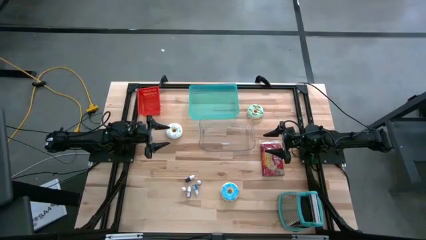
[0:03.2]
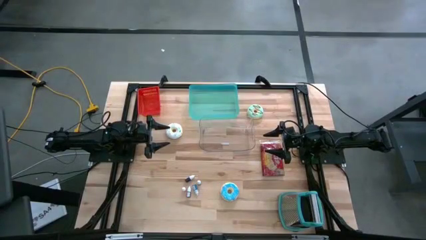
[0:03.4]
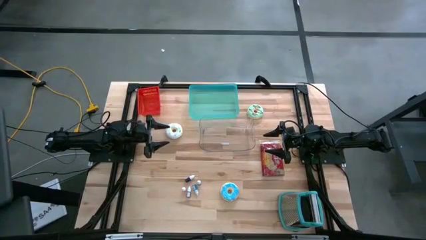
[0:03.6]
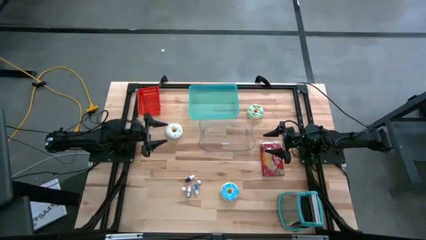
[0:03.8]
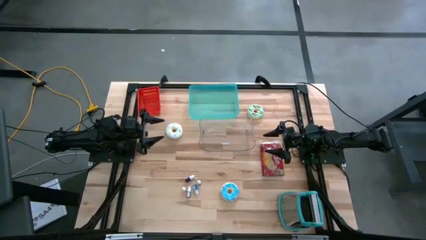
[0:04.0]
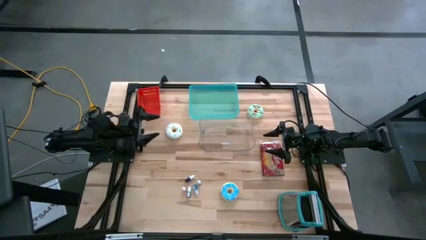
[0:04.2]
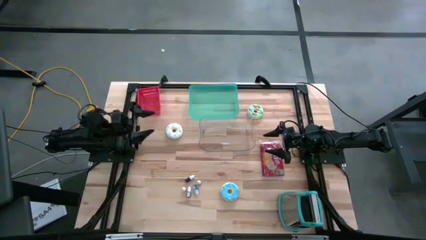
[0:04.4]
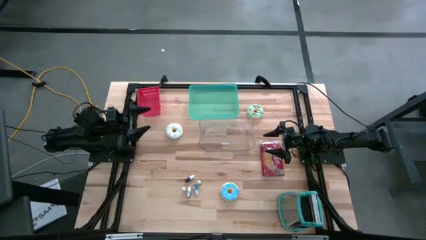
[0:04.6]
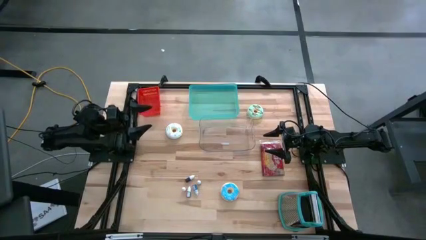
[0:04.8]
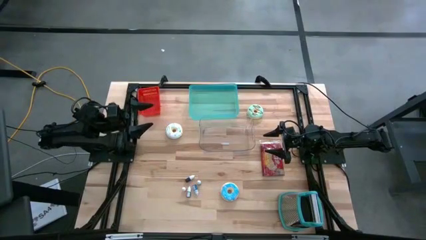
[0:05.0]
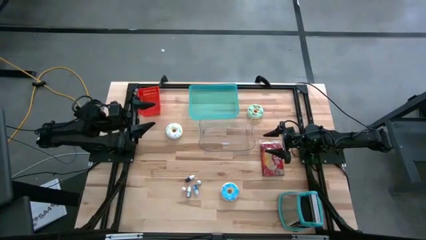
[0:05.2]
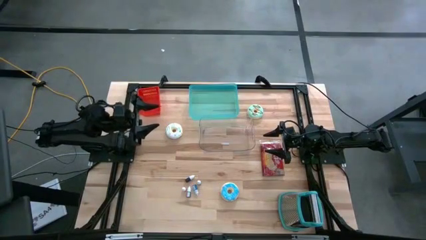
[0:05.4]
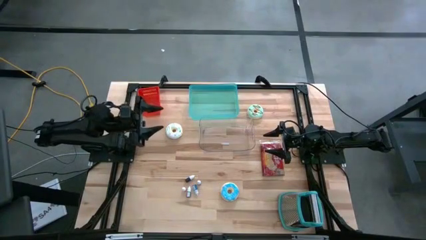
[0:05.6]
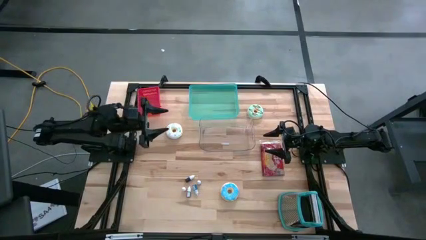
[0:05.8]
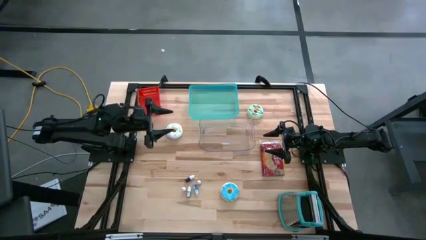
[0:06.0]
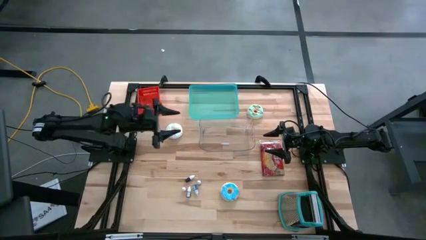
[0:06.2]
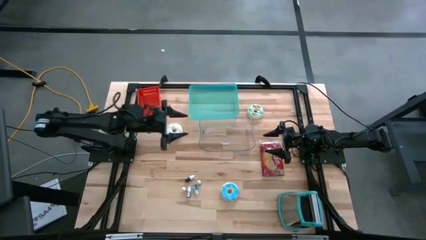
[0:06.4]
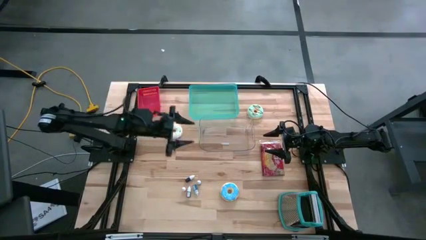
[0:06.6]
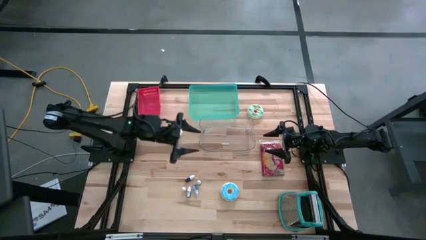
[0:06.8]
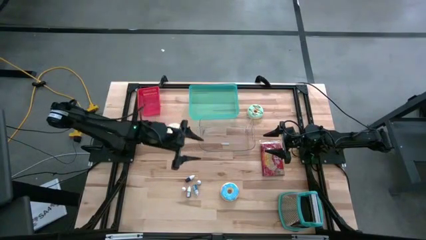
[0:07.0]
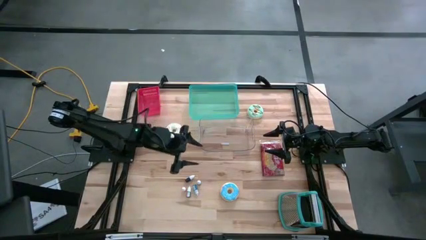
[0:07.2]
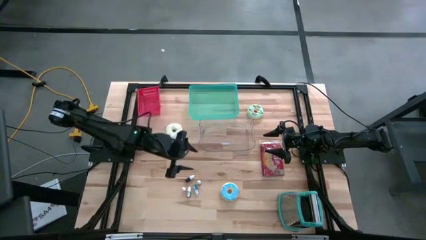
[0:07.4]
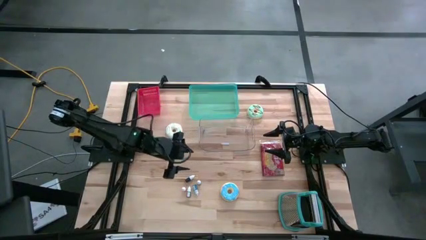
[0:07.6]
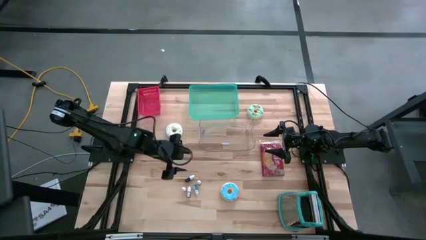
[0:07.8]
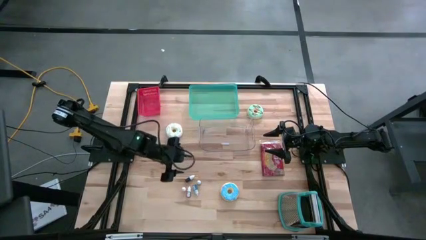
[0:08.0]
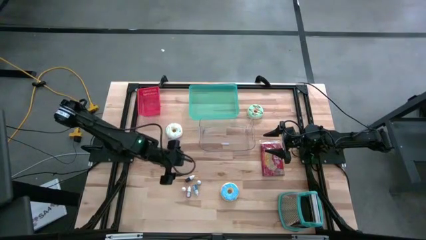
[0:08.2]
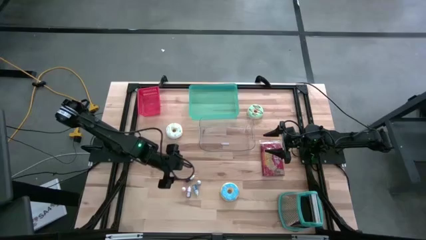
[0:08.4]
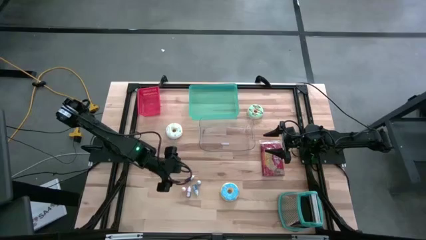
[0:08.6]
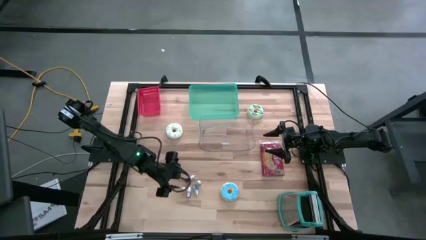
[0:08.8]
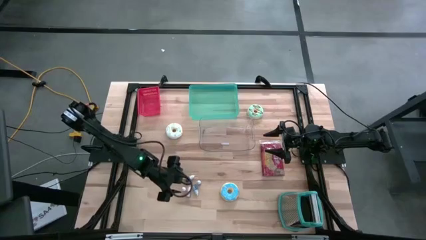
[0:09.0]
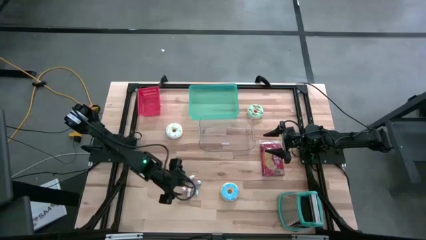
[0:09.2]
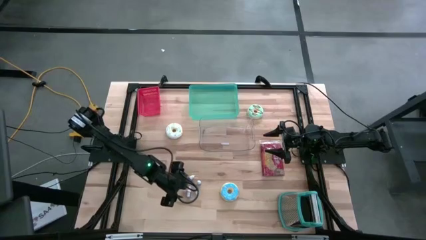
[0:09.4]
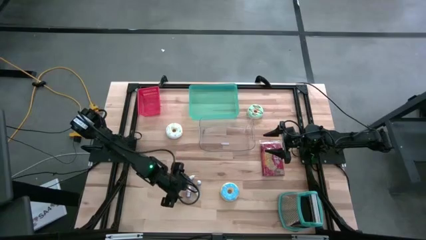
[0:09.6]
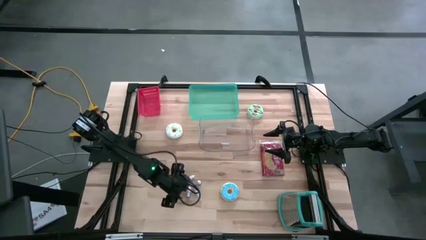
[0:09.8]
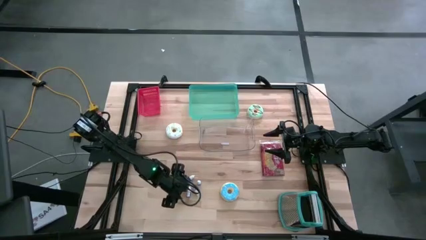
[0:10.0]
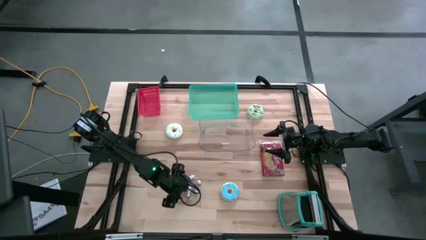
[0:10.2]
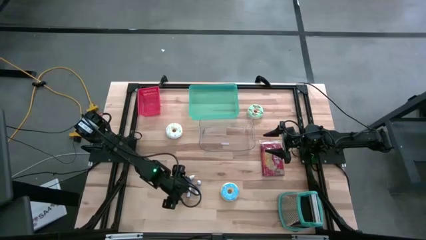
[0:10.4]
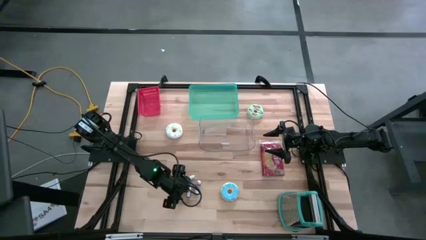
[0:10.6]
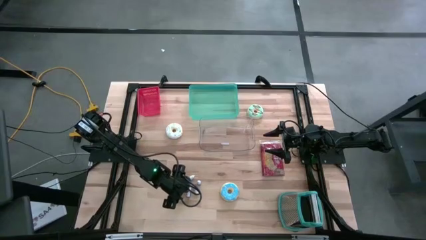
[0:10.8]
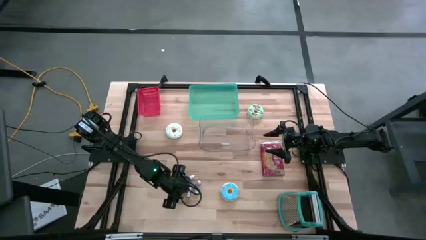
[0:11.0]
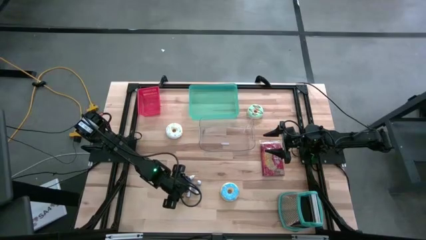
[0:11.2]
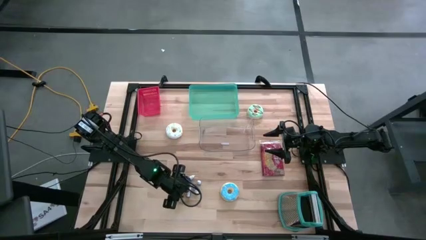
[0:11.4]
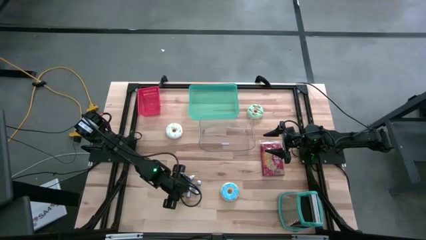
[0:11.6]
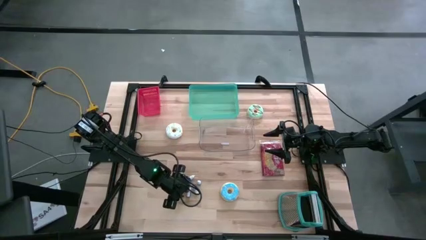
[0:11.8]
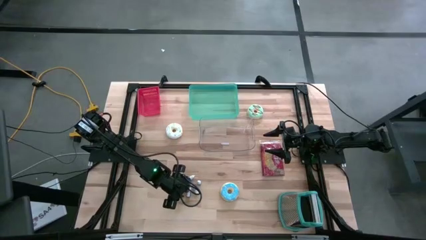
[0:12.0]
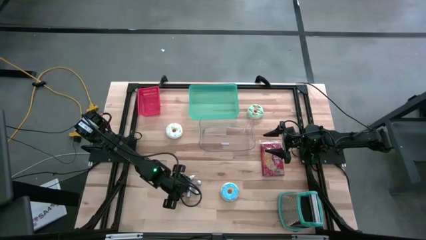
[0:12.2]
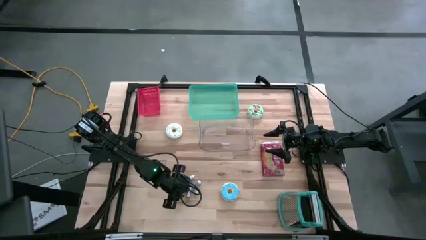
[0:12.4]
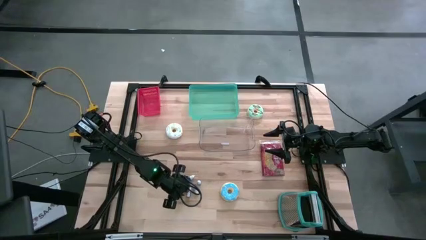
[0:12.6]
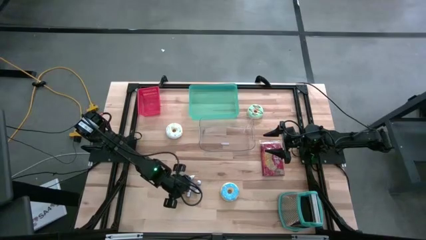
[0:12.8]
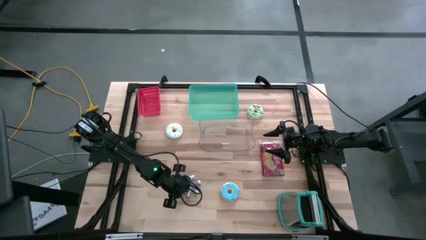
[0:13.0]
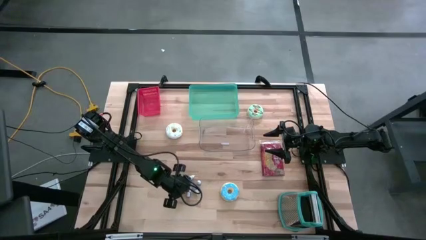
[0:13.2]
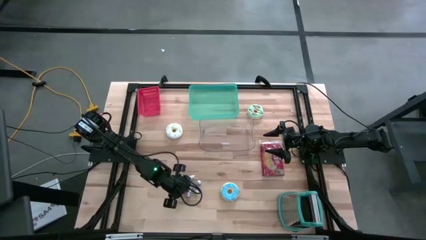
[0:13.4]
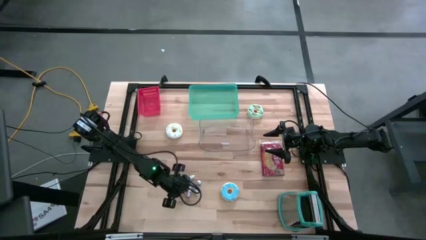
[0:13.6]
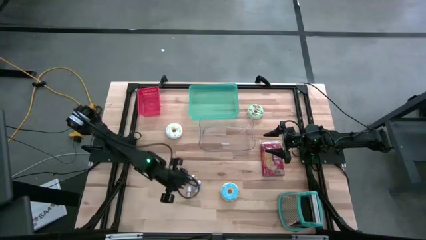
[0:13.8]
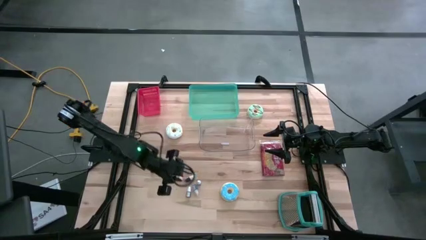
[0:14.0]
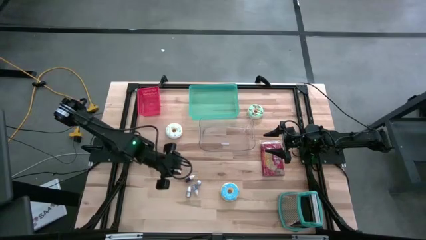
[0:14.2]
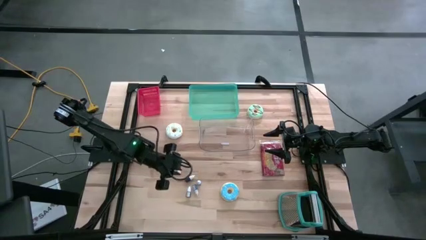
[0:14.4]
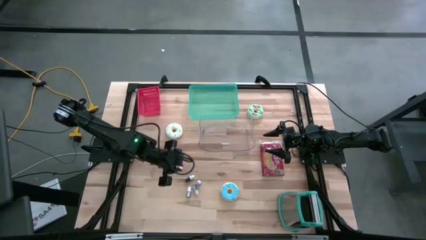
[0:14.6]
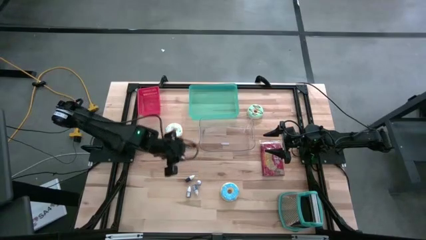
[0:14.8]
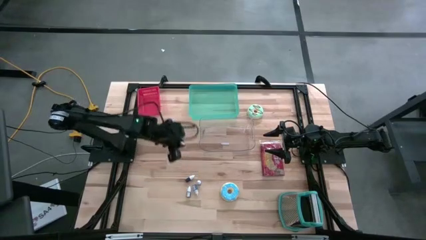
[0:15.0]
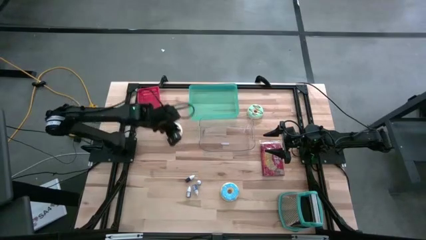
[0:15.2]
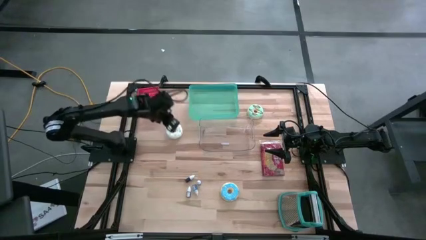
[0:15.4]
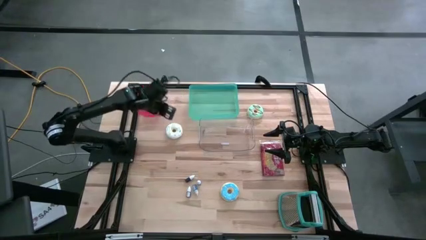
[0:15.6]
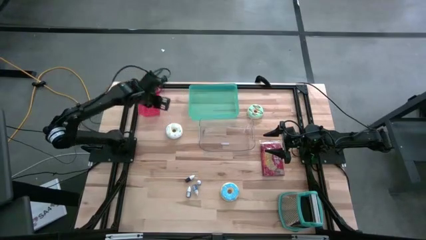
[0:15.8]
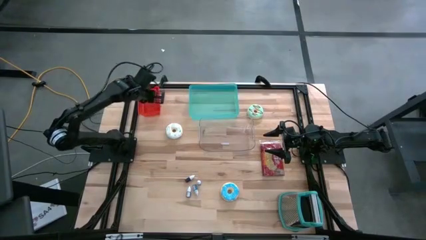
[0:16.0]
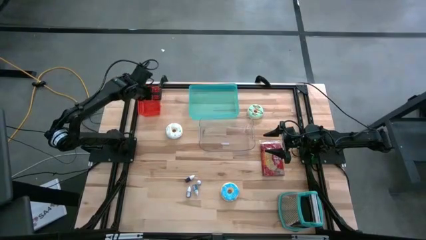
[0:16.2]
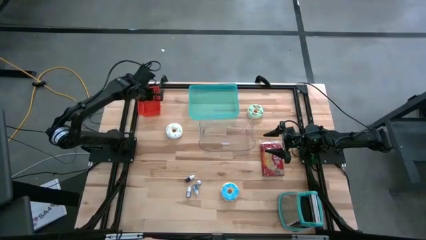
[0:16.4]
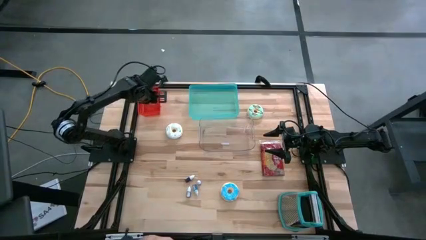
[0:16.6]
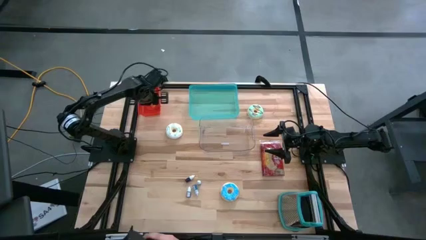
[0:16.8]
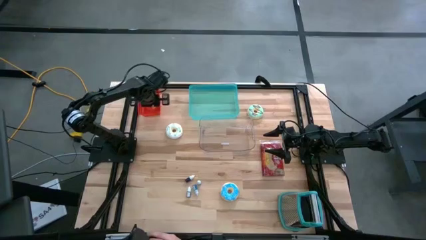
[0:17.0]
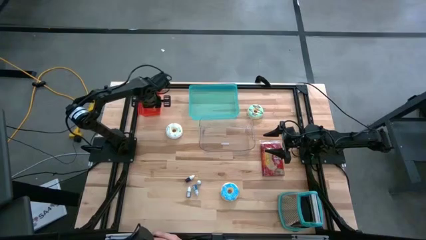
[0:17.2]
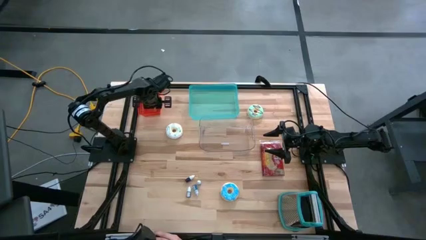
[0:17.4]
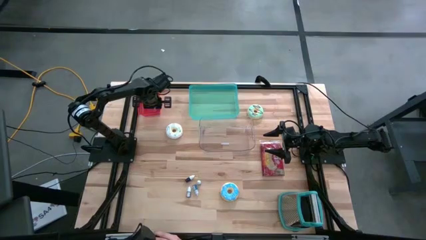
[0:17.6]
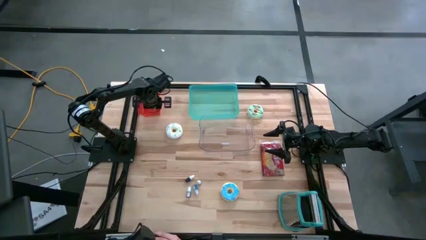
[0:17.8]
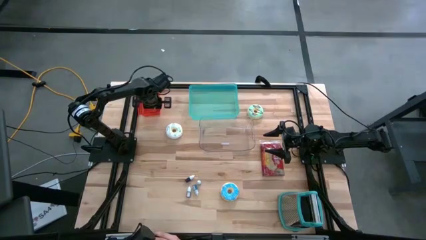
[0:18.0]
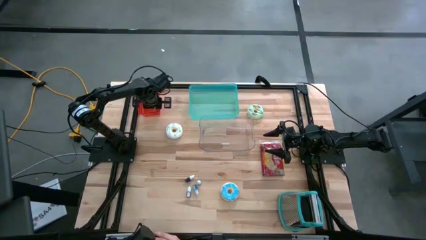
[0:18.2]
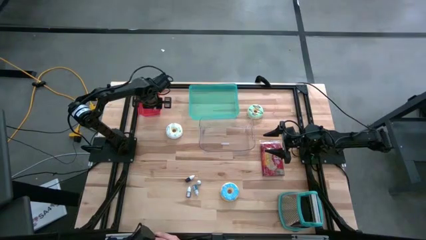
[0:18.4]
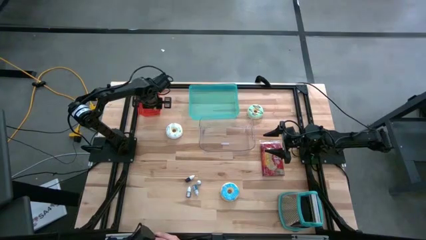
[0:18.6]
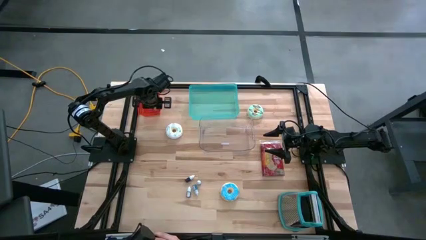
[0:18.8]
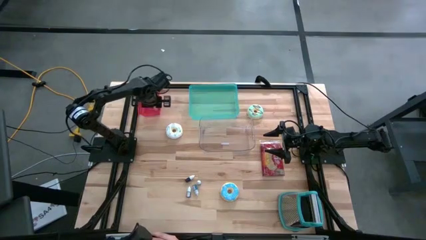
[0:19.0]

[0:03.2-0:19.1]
Put the orange food coloring bottle into the red bin
